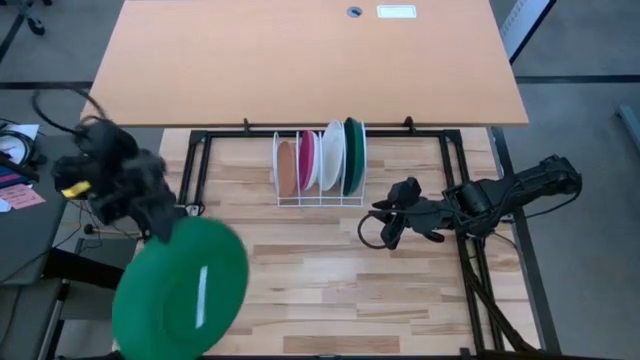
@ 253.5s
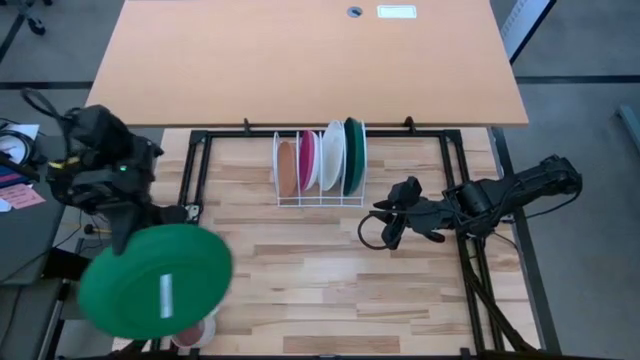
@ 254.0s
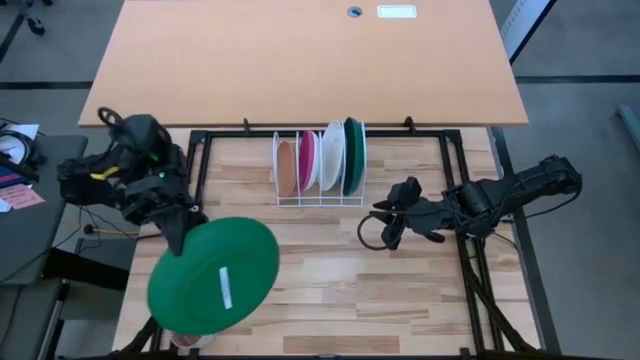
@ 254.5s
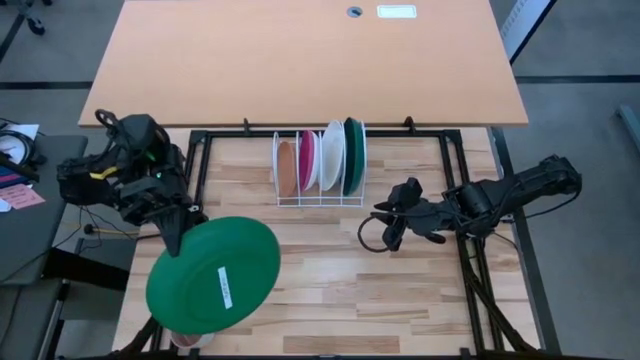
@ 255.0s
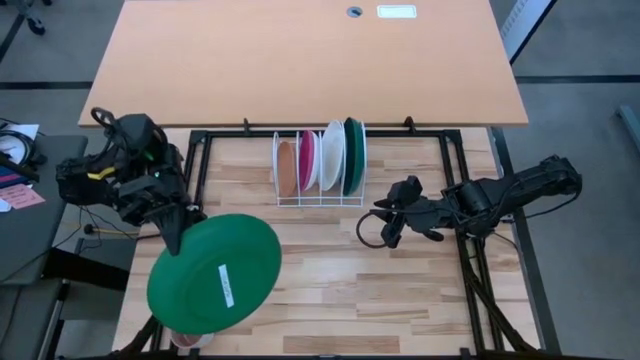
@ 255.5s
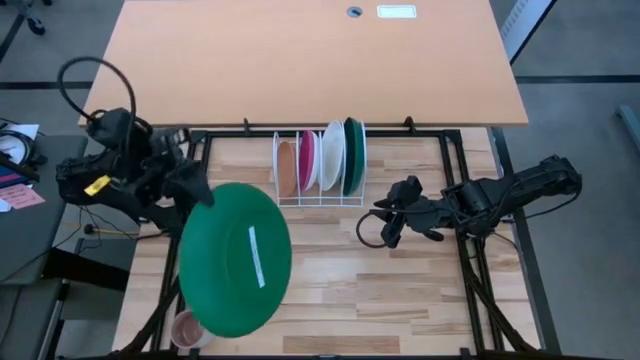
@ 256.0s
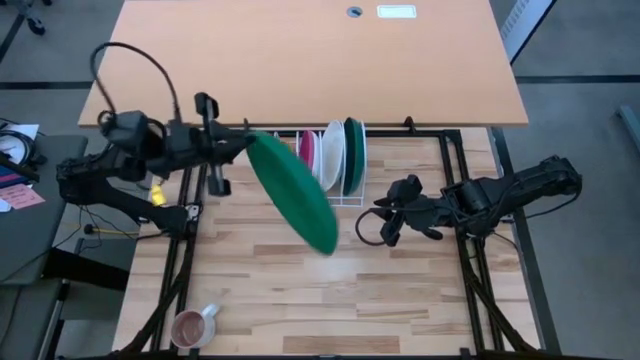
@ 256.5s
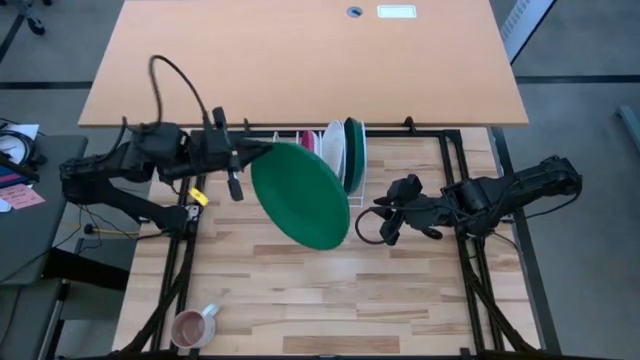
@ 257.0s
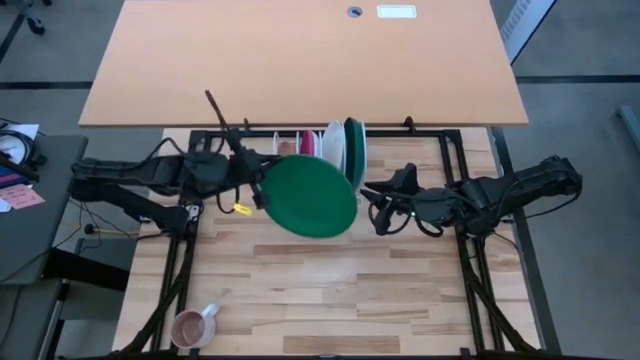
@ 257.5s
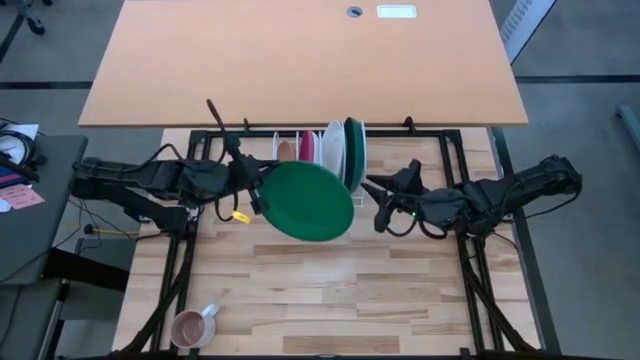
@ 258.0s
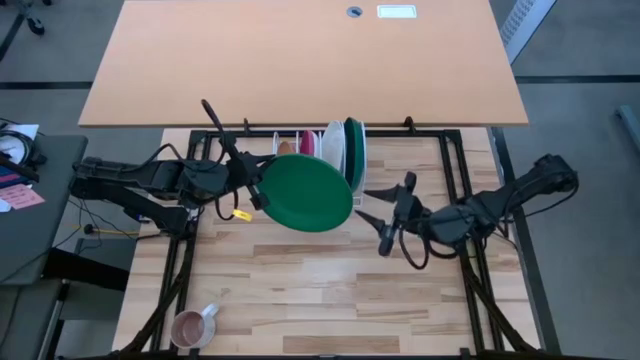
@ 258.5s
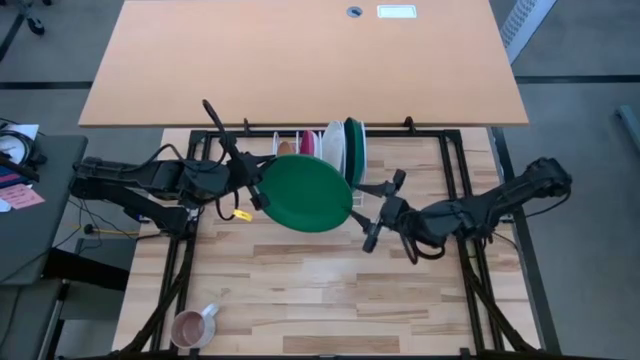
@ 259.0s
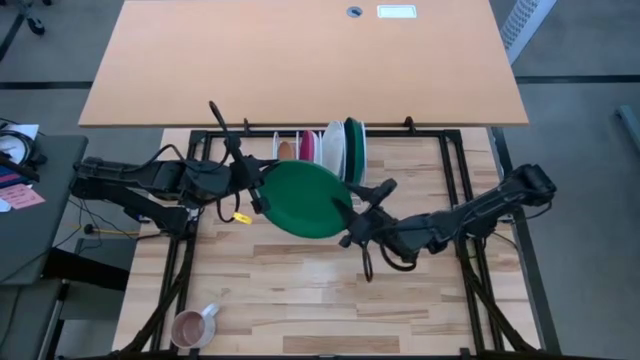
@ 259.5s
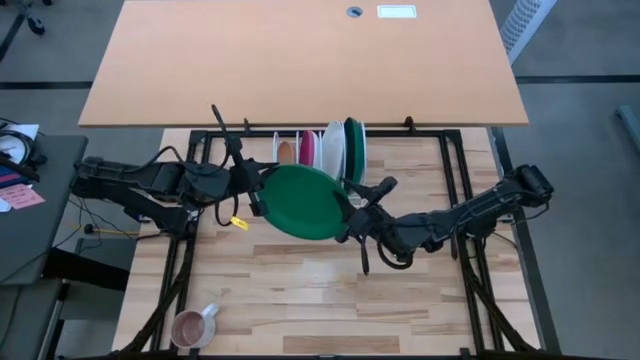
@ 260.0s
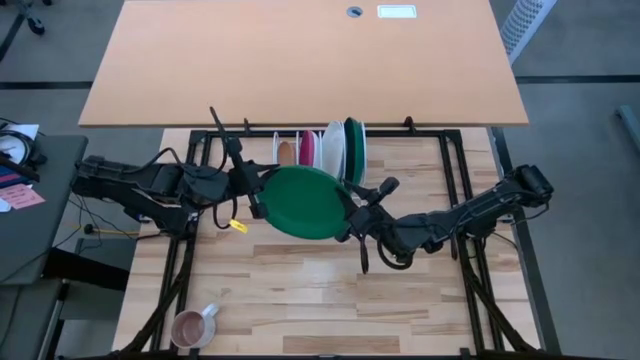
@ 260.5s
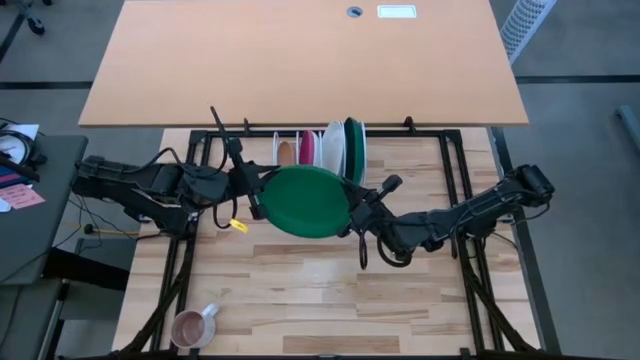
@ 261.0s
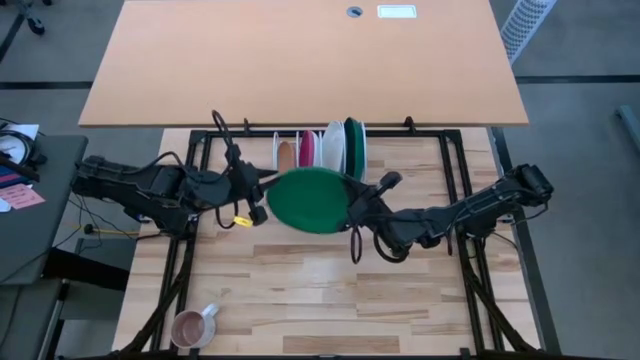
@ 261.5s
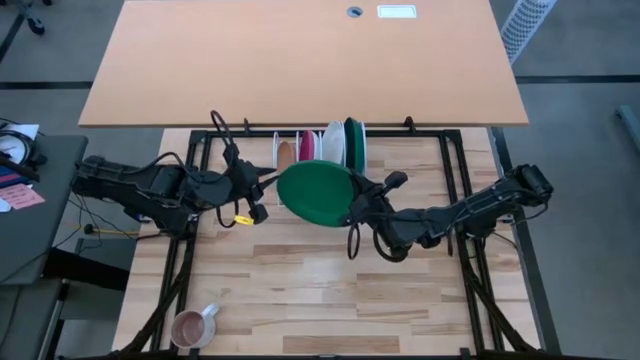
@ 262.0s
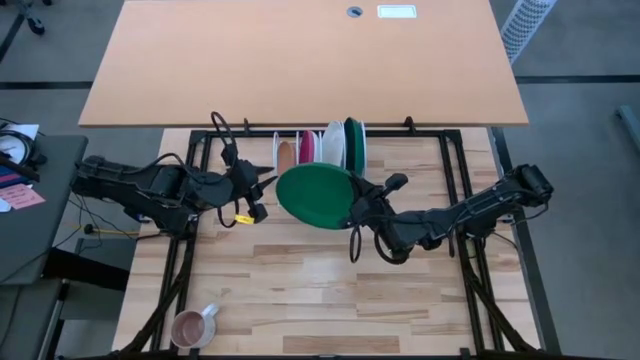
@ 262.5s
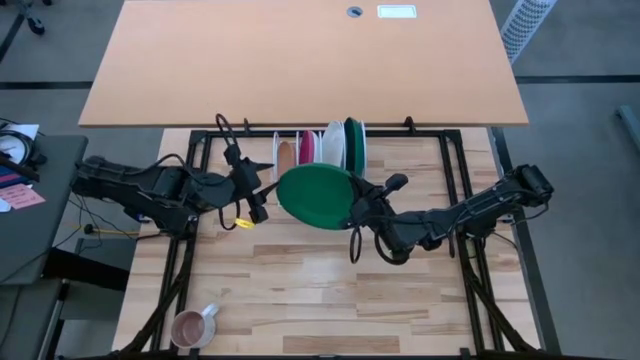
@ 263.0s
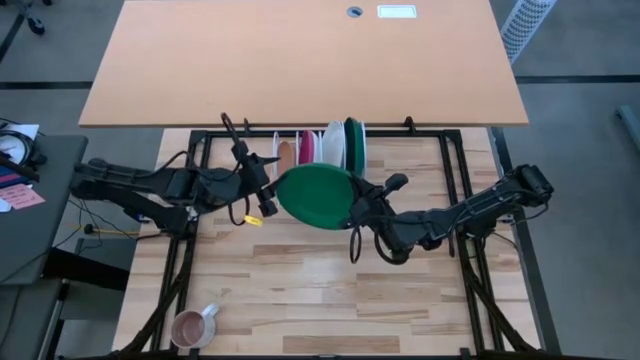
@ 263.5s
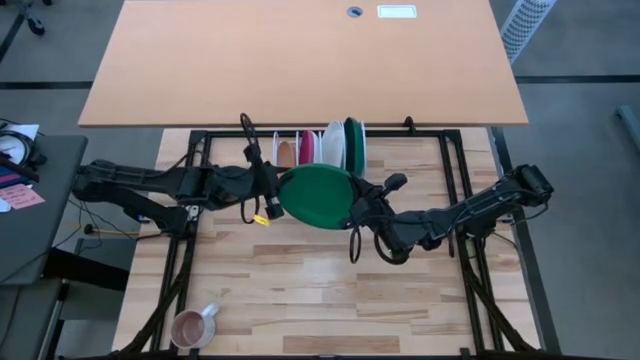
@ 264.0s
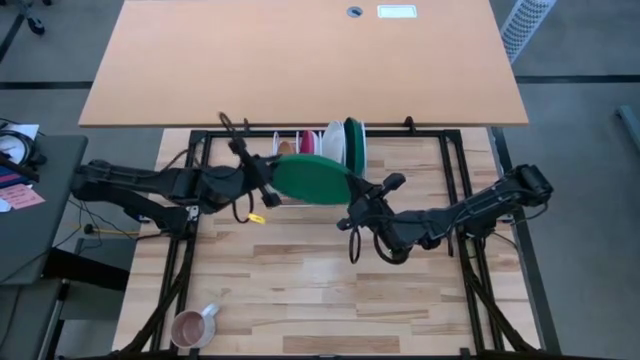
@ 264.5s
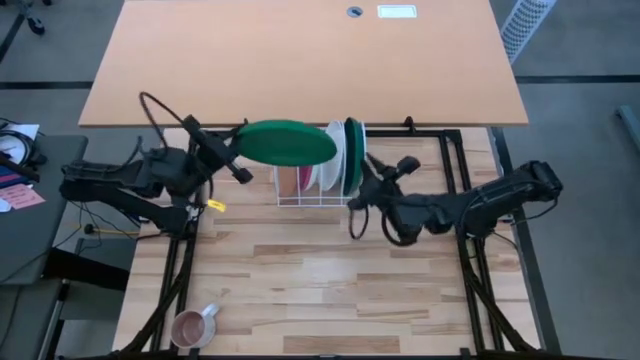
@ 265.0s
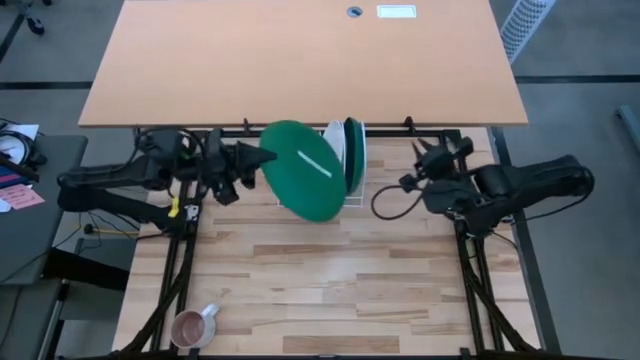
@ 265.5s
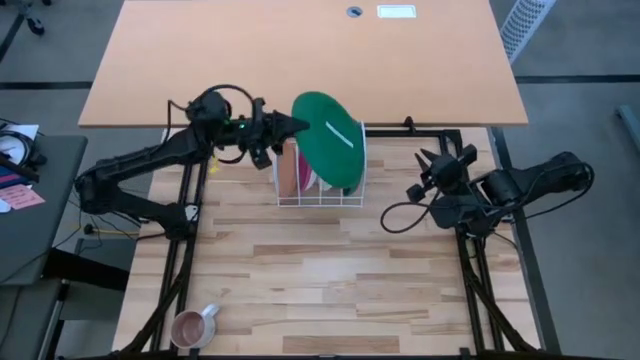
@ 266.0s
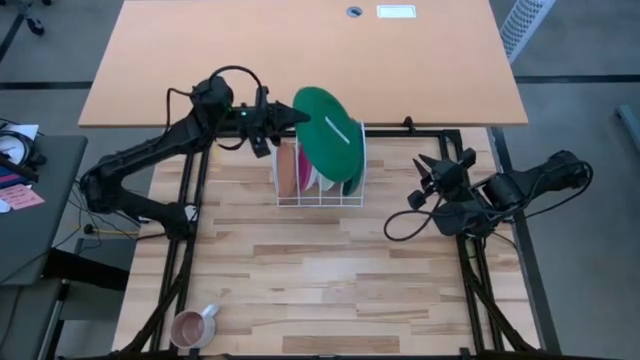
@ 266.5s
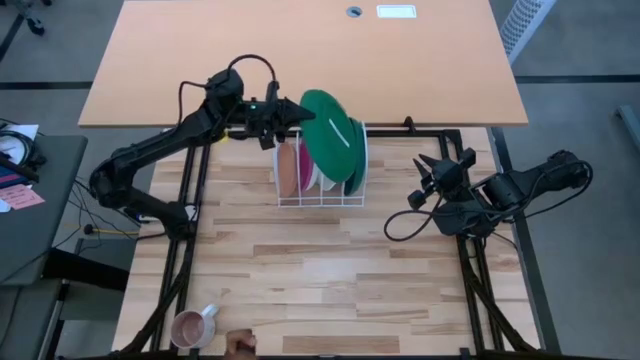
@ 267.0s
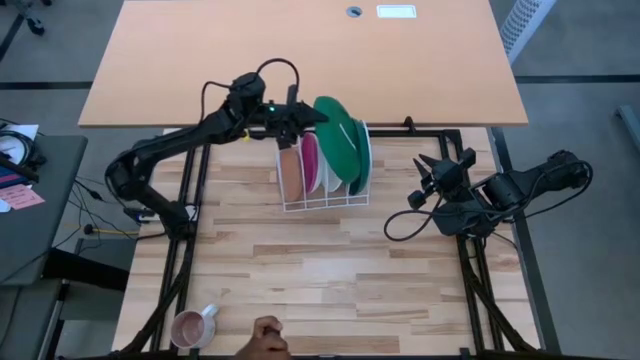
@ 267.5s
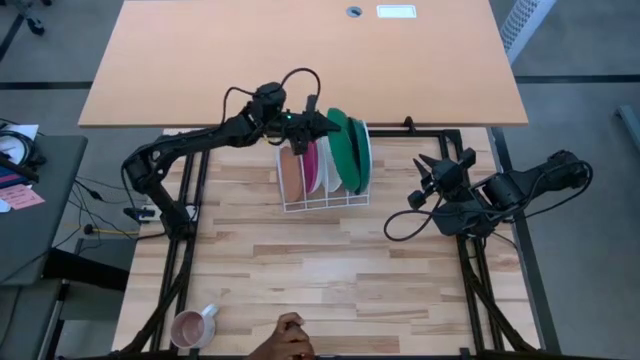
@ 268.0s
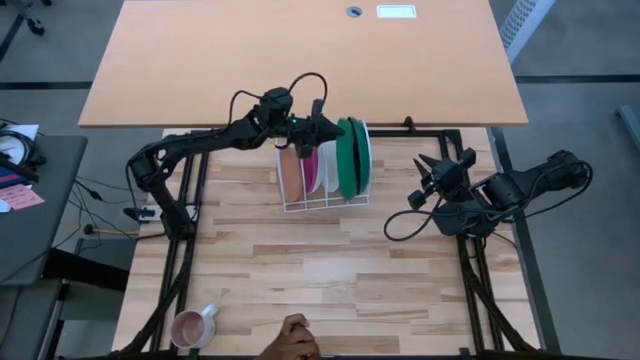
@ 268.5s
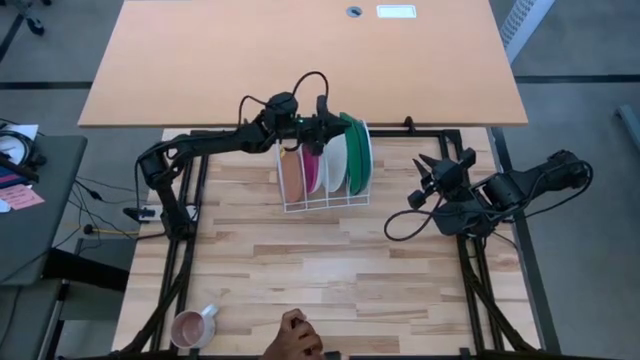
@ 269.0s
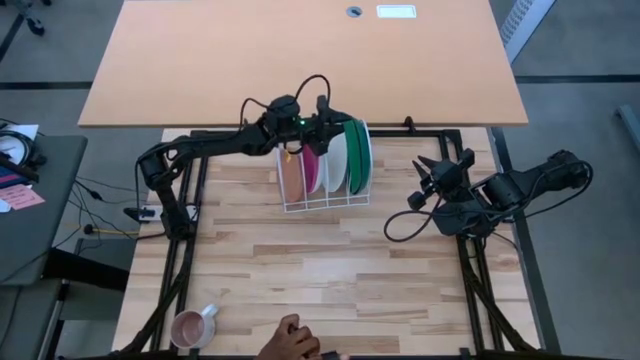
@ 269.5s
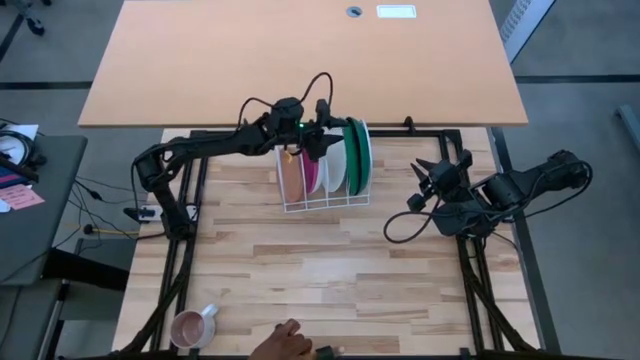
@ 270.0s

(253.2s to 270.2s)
Task: Sort dishes
Put the green plate in the dish rack

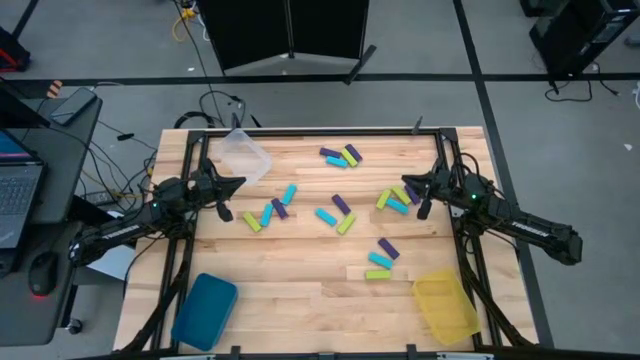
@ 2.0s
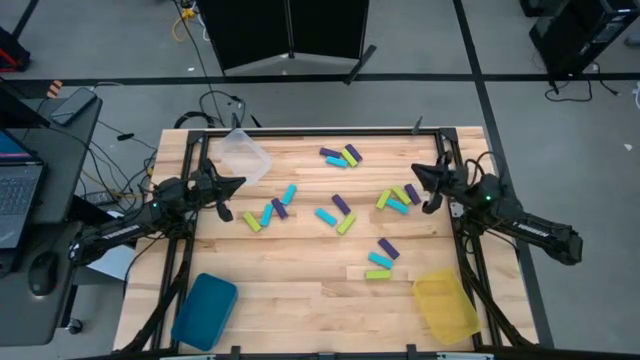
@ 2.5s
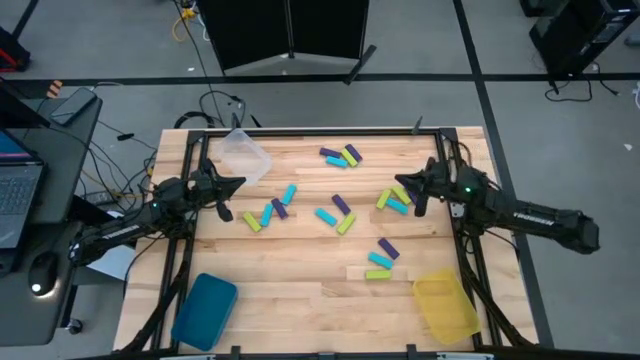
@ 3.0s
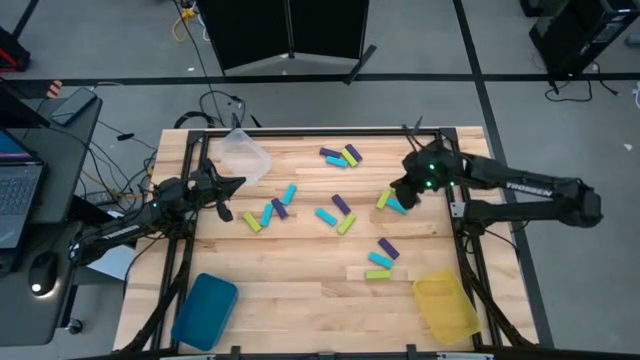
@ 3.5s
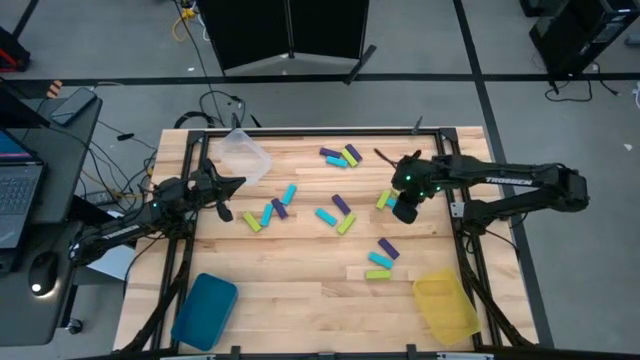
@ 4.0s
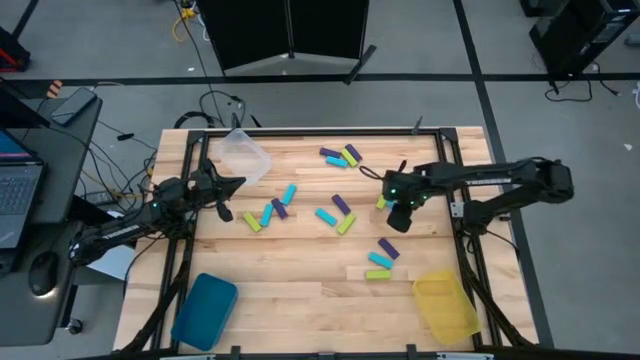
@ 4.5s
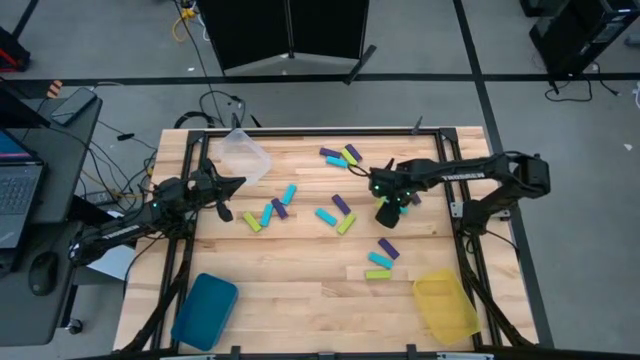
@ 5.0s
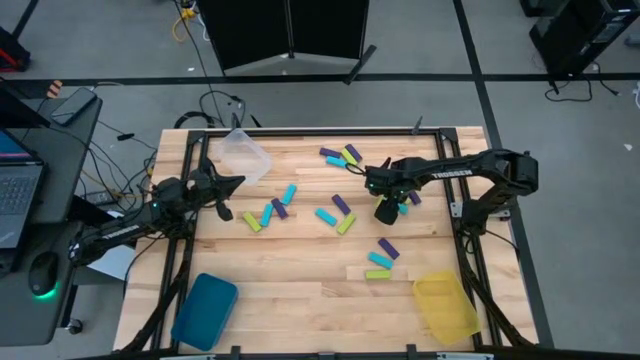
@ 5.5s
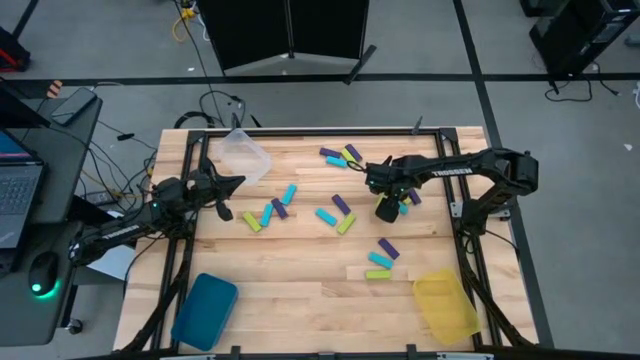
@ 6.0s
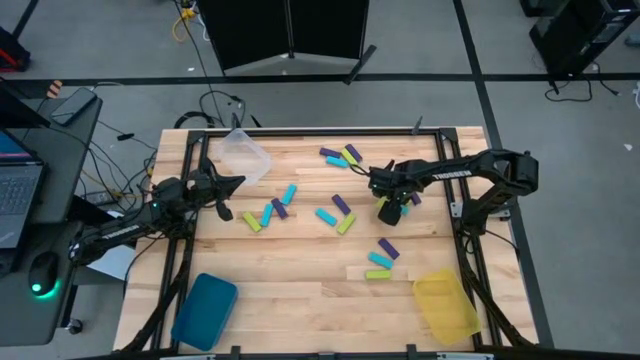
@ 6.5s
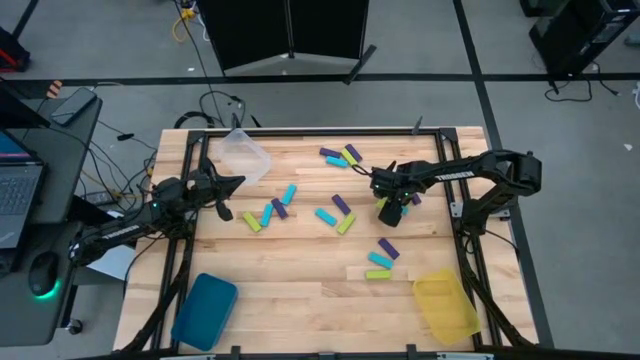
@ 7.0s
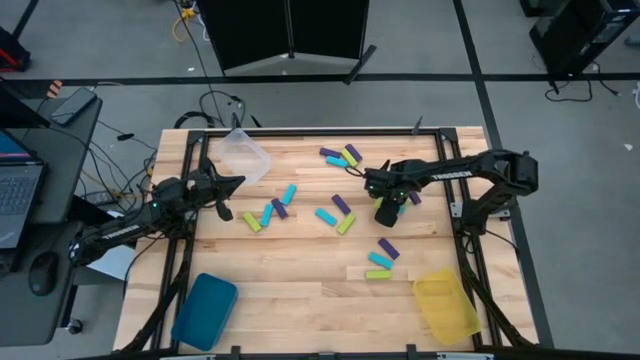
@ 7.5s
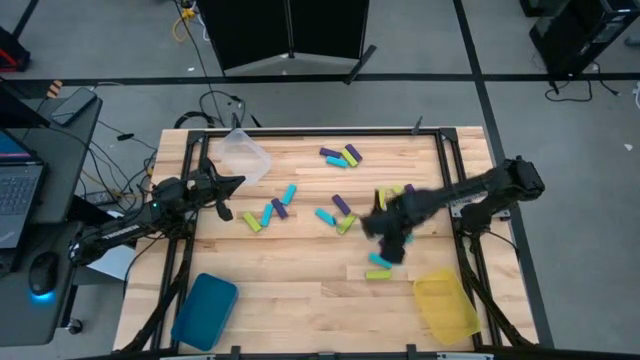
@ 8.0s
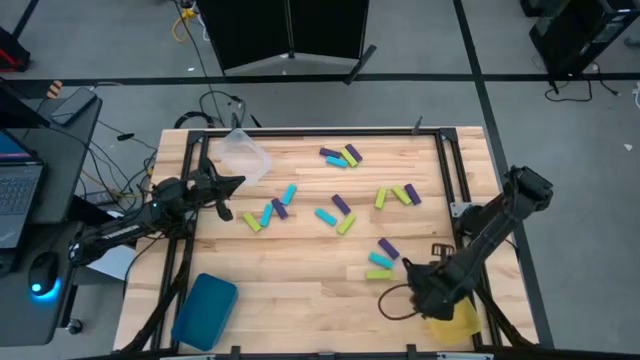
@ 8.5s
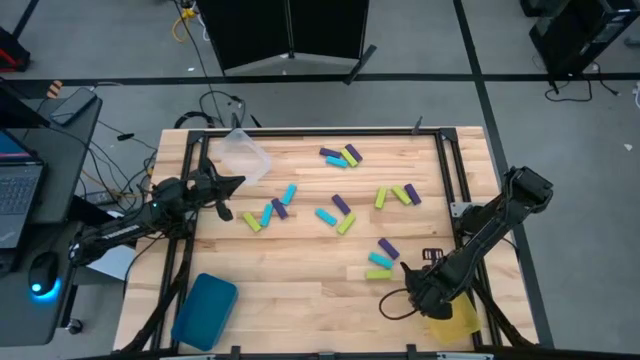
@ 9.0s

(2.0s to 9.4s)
Task: Sort blocks
Put the blue block into the yellow bin
